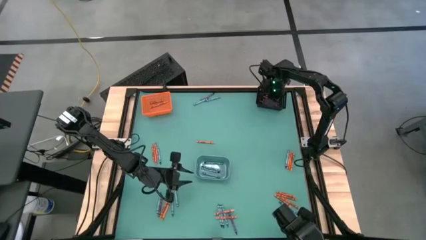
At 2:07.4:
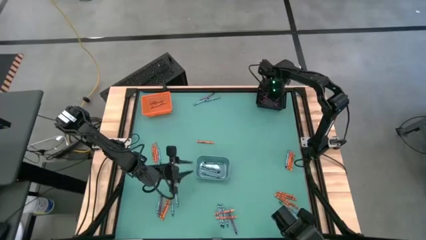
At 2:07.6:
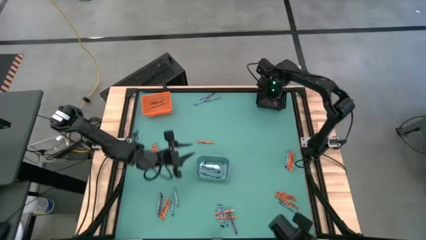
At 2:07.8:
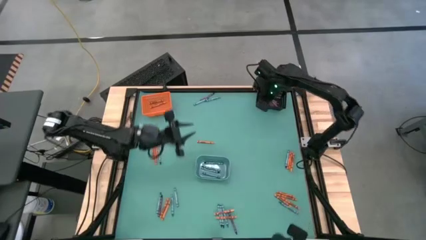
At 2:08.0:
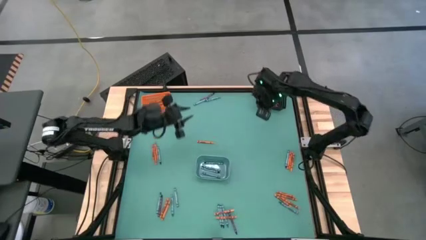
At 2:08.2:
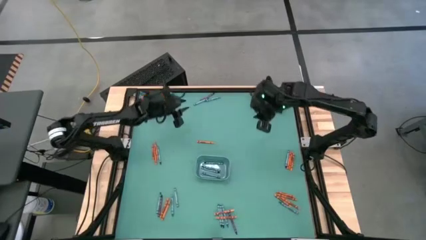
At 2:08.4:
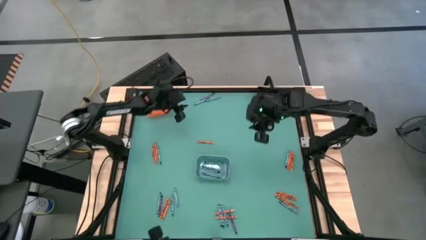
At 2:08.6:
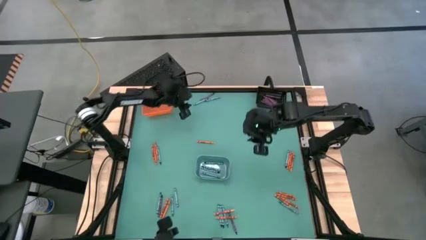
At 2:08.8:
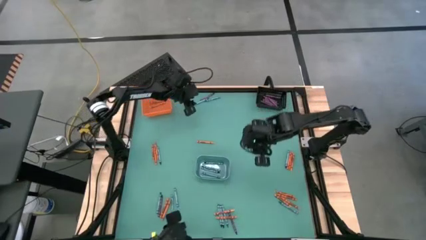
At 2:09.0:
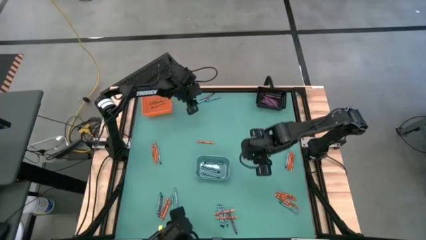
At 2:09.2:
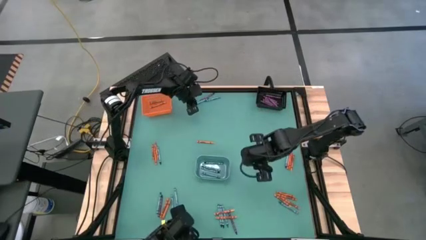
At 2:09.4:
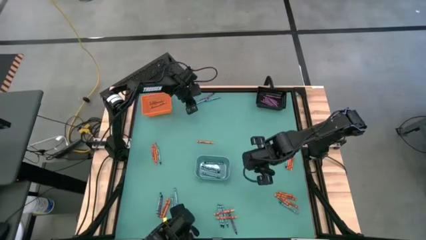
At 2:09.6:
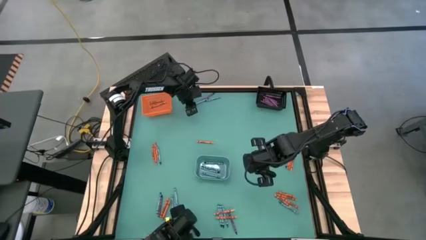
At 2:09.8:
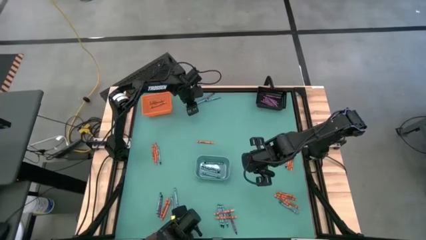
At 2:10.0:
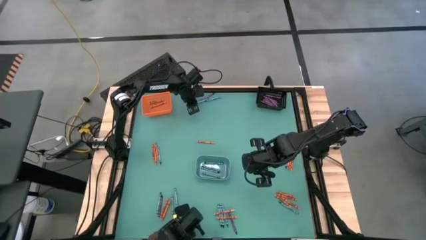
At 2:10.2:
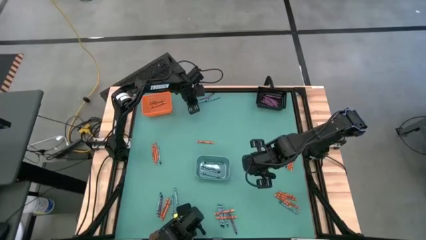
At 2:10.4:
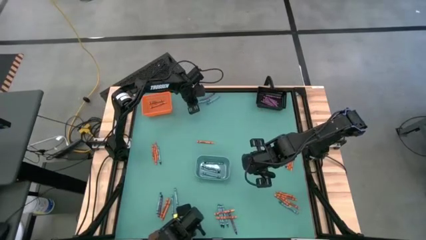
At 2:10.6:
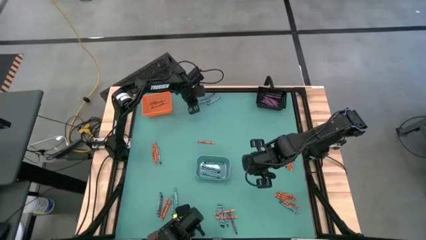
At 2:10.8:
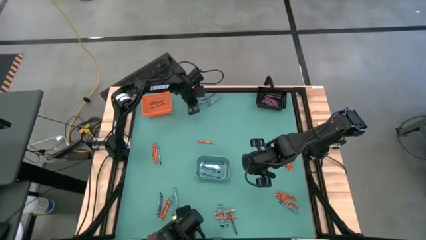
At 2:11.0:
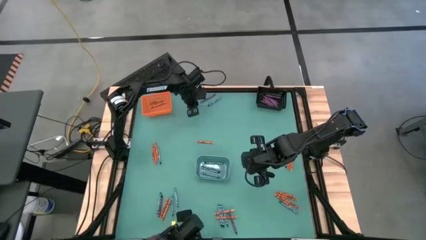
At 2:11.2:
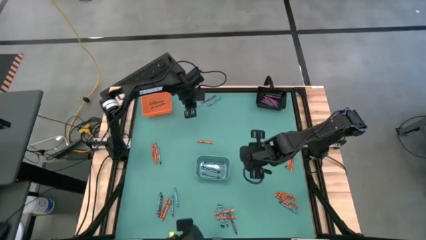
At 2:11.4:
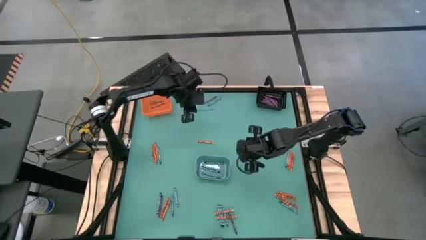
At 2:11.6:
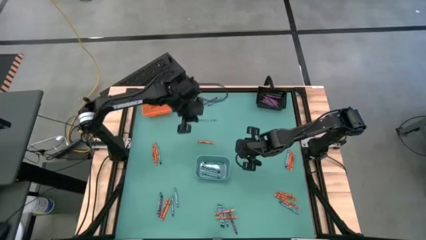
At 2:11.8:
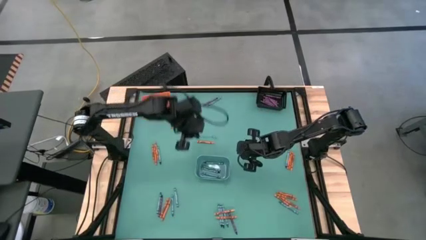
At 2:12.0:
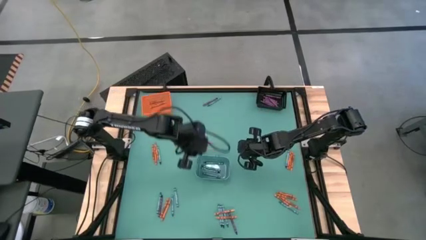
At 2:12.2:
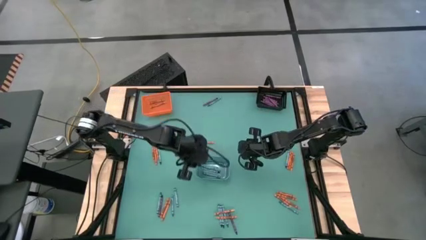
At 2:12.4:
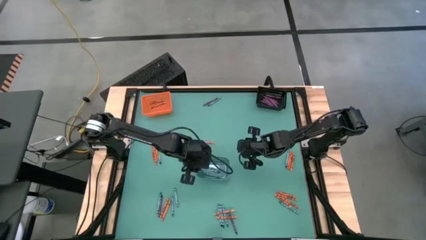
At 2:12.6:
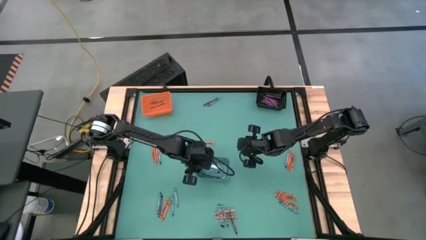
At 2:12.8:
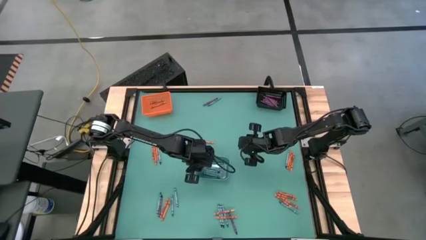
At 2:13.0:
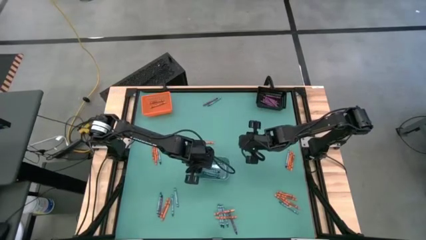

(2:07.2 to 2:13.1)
Task: Sort crayons
Put the light blue crayon into the blue bin

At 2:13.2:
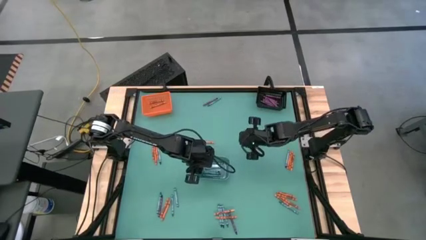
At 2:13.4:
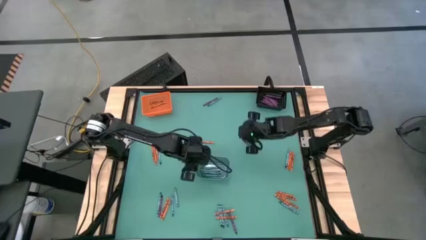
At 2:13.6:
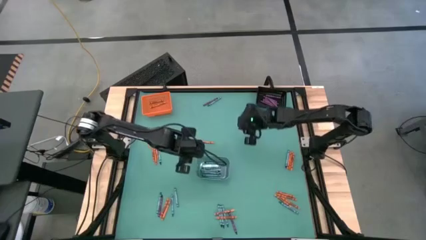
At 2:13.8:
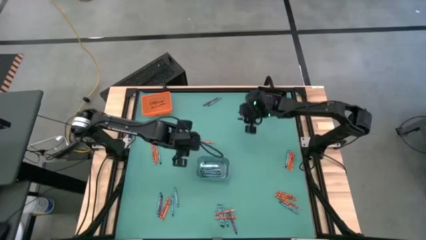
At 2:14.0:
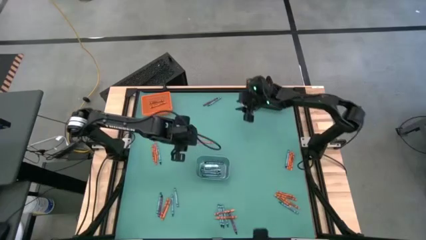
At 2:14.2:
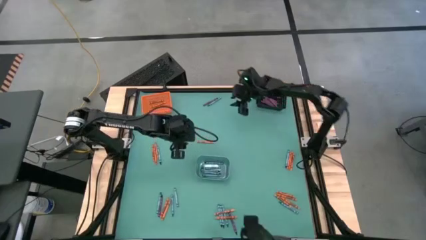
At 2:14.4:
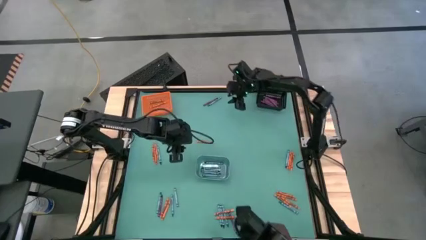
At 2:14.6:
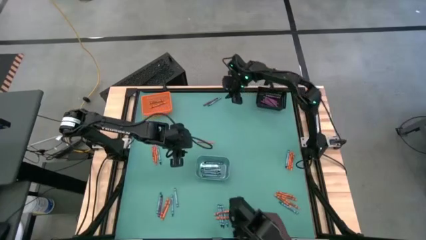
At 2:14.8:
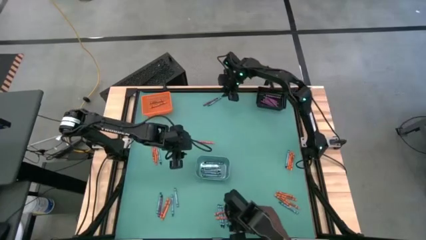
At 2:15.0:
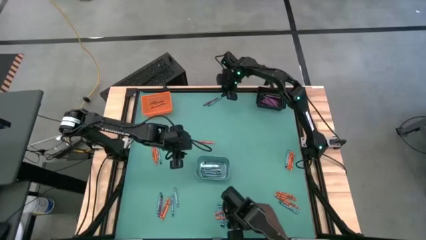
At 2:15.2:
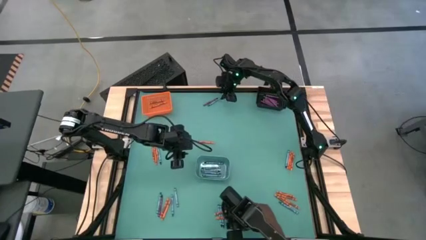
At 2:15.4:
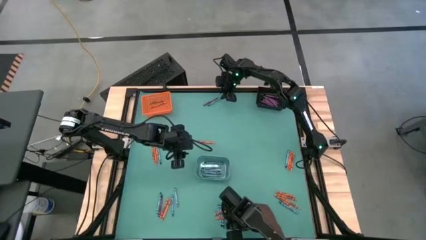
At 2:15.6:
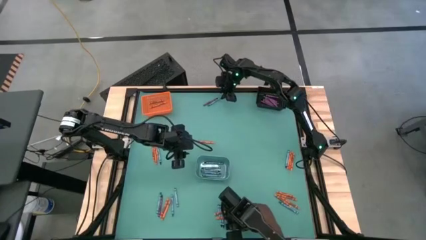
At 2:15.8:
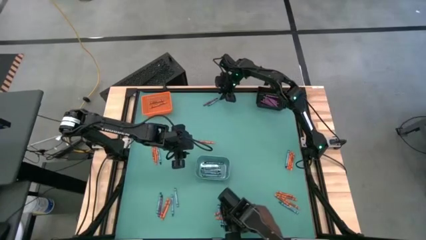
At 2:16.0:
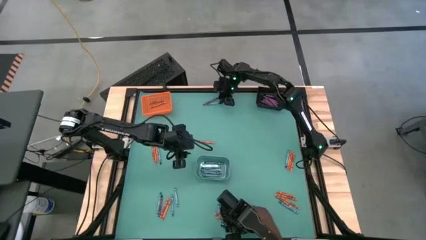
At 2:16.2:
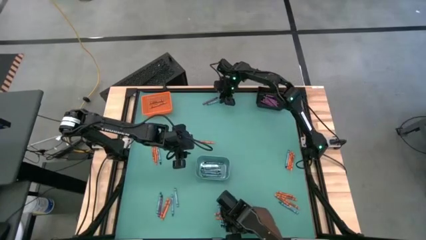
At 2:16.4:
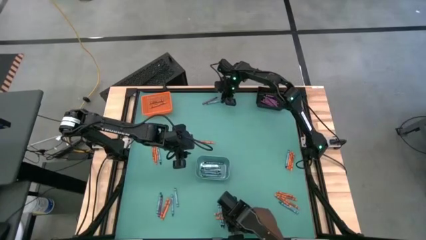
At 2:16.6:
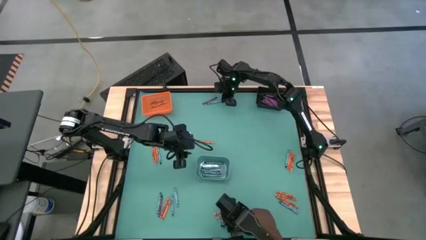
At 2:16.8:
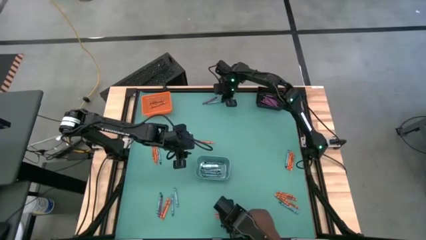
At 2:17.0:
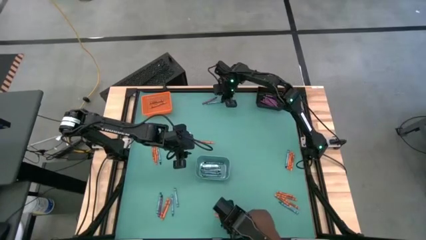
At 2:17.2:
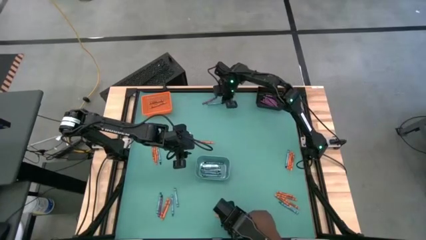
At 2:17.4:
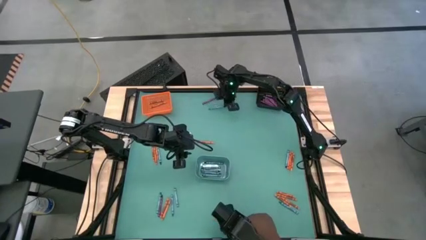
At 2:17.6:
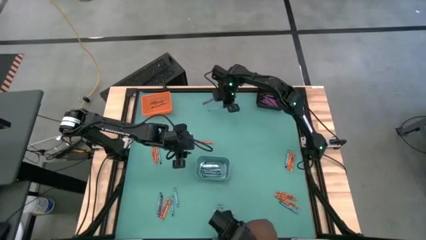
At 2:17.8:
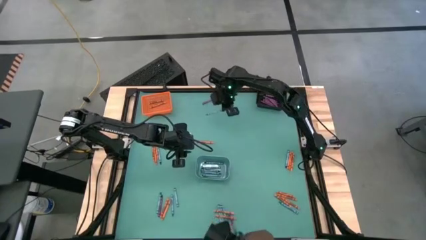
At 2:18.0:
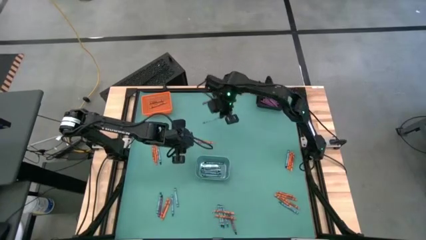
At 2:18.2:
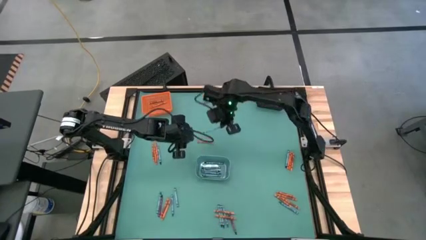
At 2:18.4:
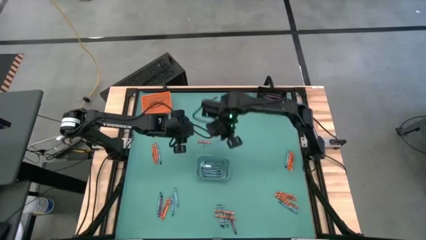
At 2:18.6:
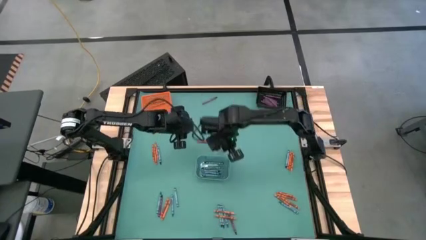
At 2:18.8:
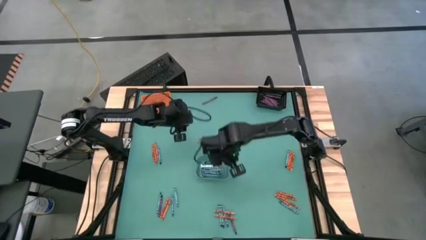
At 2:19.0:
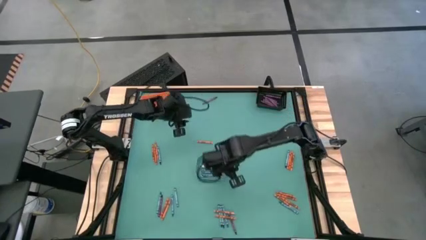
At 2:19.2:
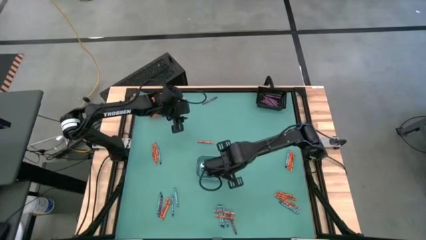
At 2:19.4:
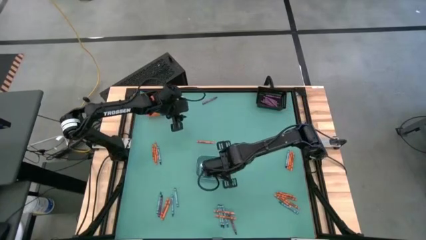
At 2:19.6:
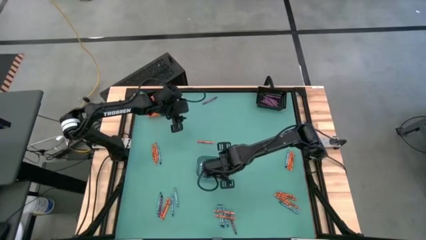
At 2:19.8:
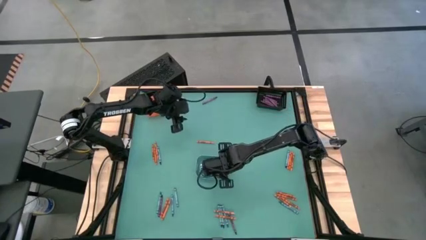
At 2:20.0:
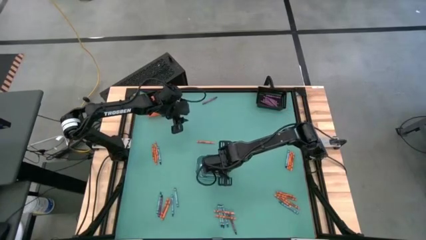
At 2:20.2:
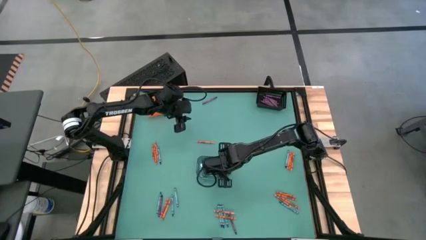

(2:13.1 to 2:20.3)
Put the light blue crayon into the blue bin

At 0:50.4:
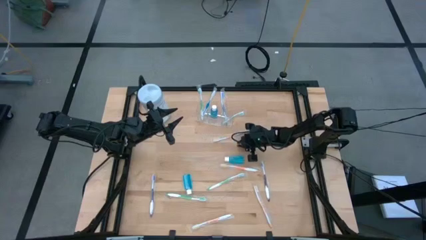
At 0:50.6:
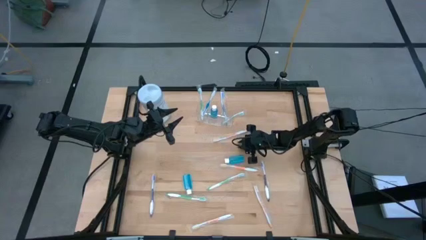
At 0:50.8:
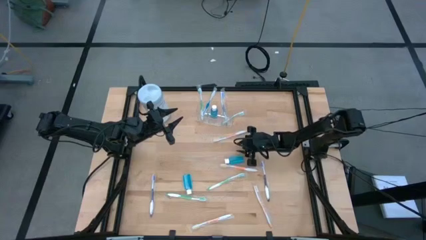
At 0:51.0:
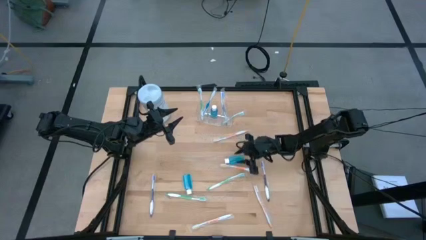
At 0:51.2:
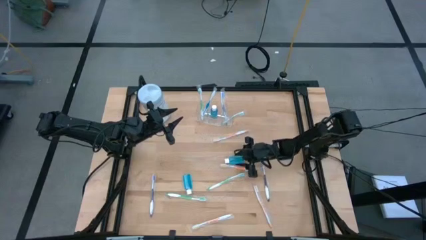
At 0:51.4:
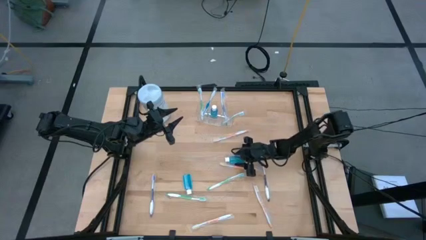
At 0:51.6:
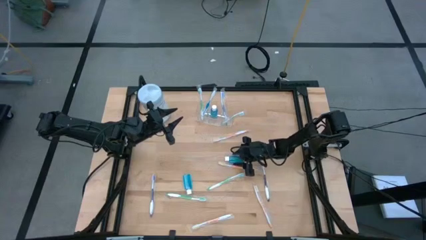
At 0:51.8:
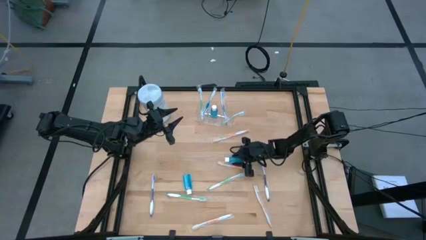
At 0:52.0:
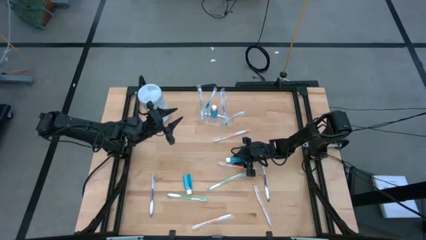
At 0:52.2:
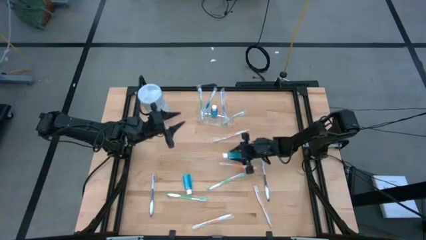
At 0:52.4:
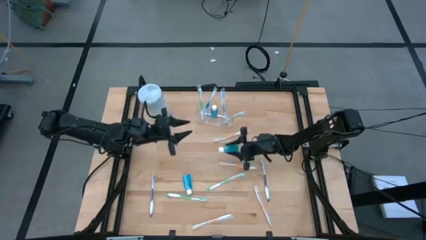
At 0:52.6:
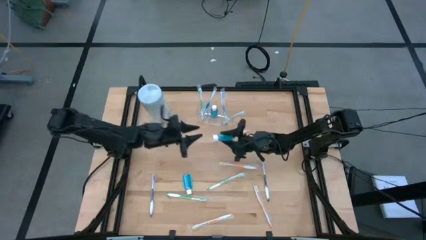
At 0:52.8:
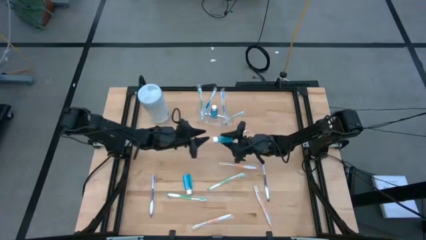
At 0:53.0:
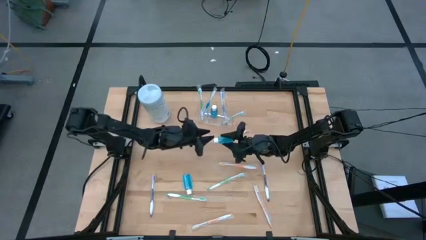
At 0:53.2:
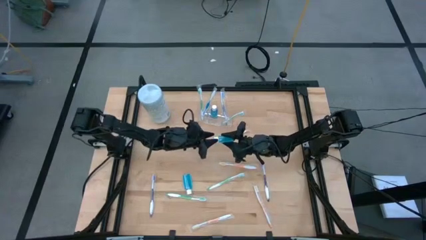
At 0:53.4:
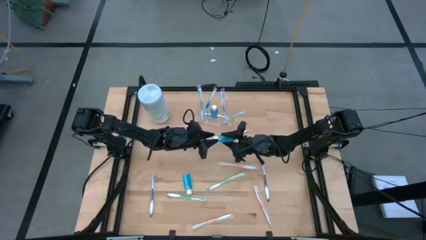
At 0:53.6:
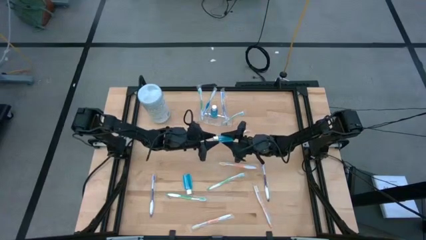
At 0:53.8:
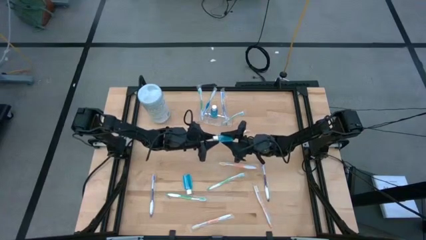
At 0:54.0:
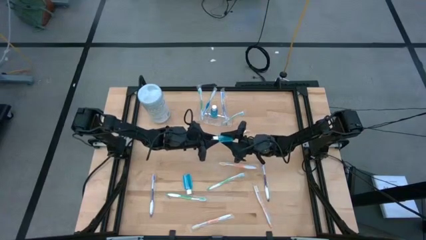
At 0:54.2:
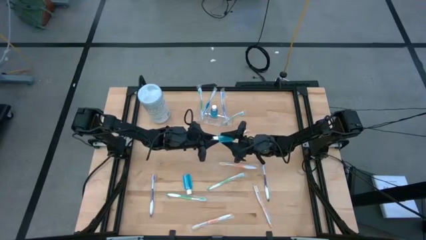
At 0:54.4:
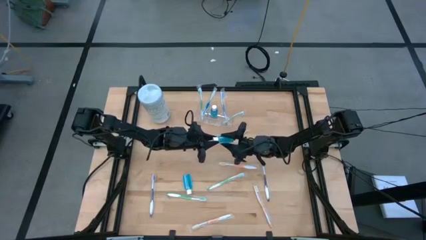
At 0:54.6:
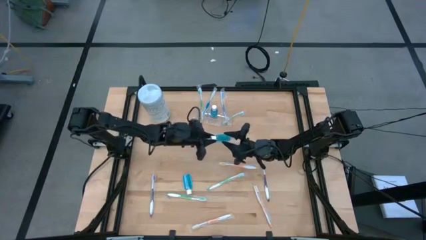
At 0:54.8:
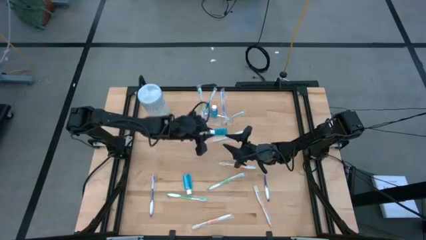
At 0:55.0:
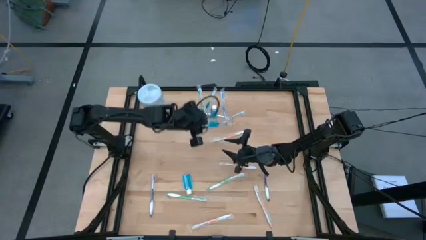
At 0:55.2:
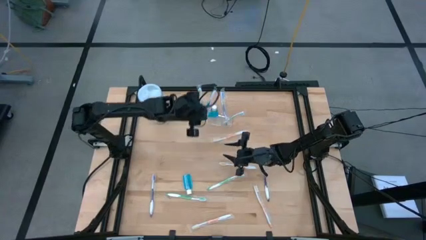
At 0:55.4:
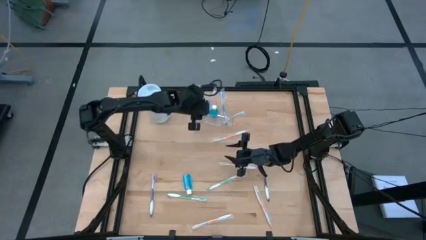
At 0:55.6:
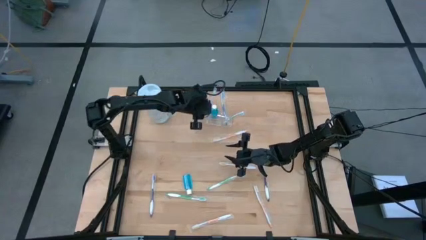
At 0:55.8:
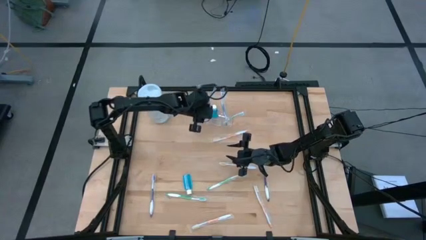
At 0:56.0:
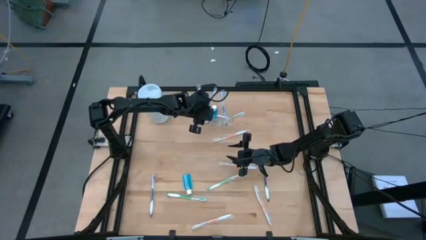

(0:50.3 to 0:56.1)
Task: Pick & Place toothbrushing station
Put the mouthwash into the transparent organizer
